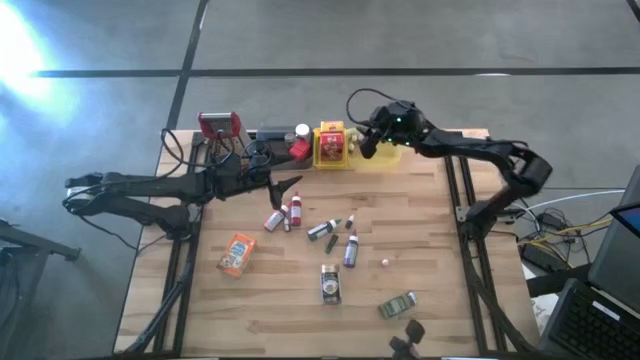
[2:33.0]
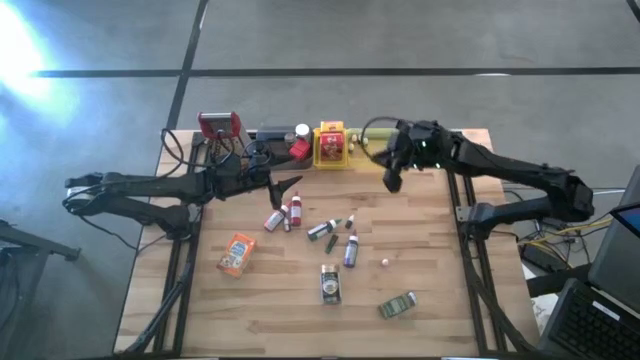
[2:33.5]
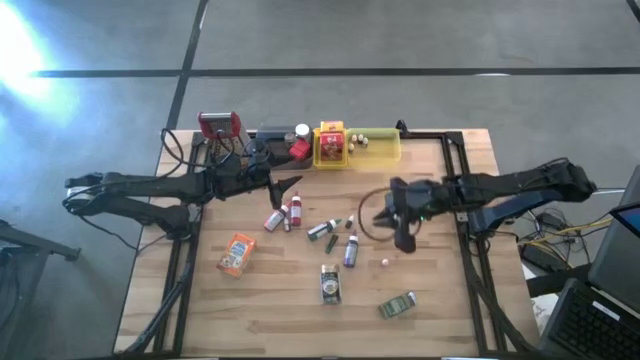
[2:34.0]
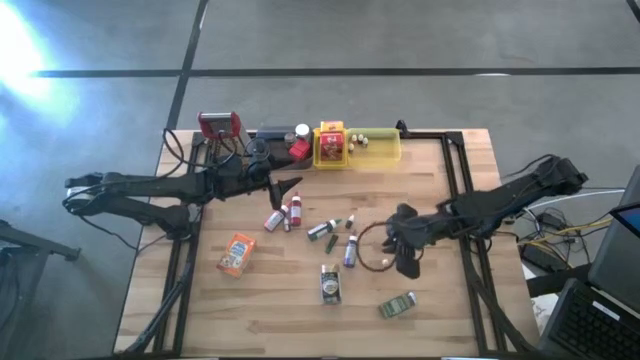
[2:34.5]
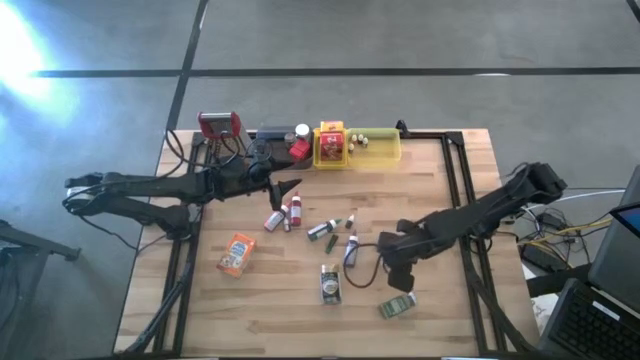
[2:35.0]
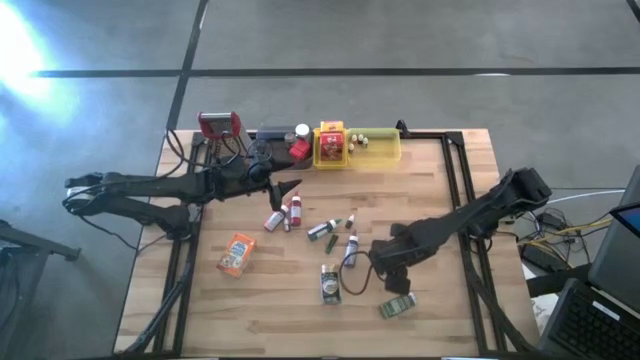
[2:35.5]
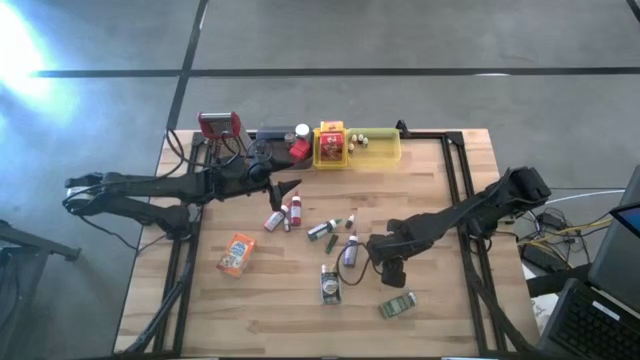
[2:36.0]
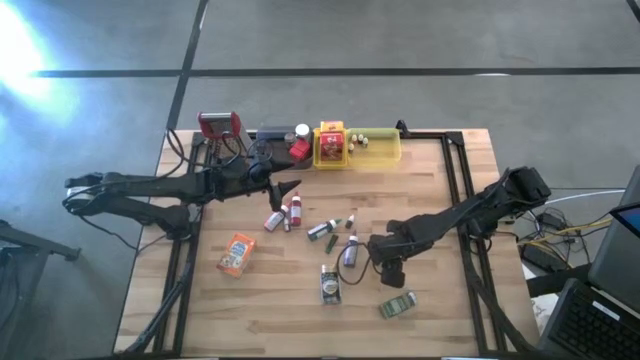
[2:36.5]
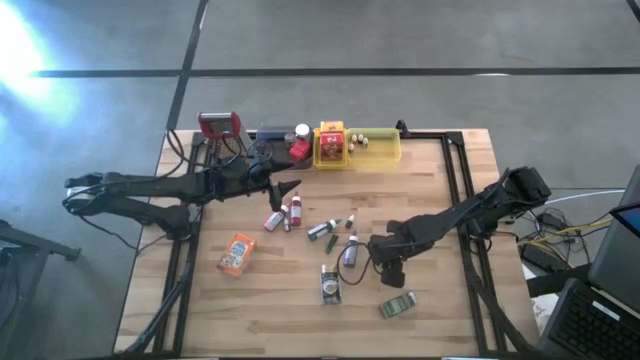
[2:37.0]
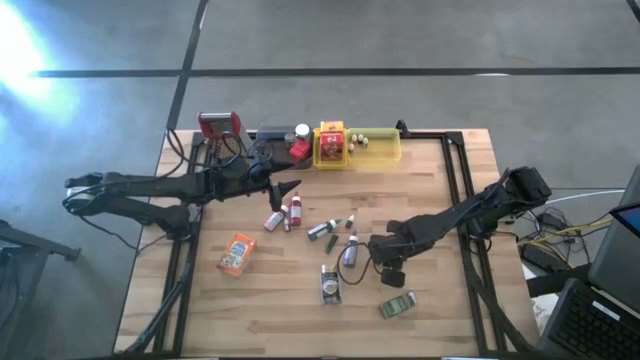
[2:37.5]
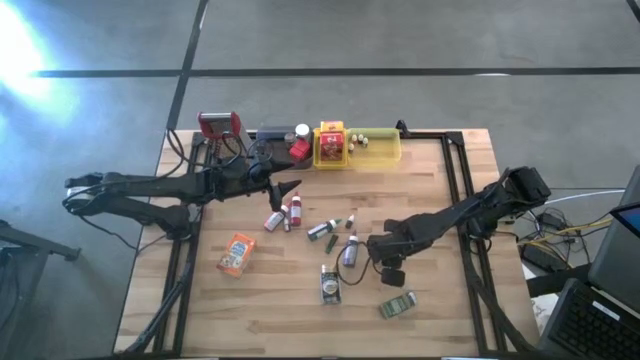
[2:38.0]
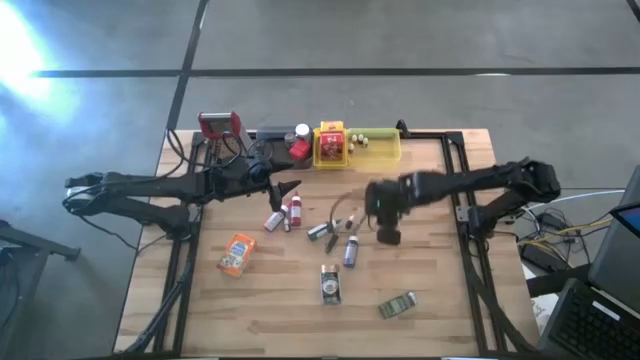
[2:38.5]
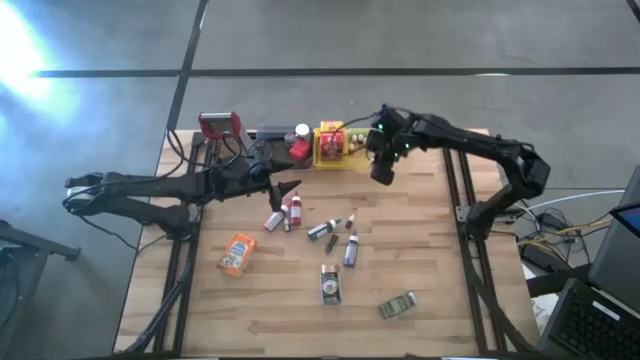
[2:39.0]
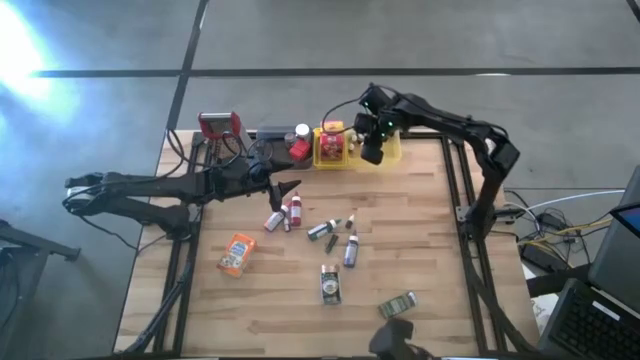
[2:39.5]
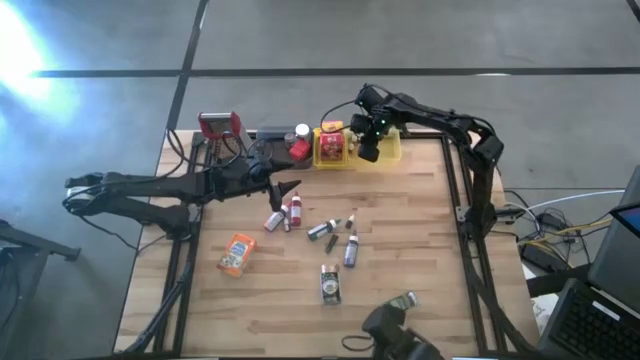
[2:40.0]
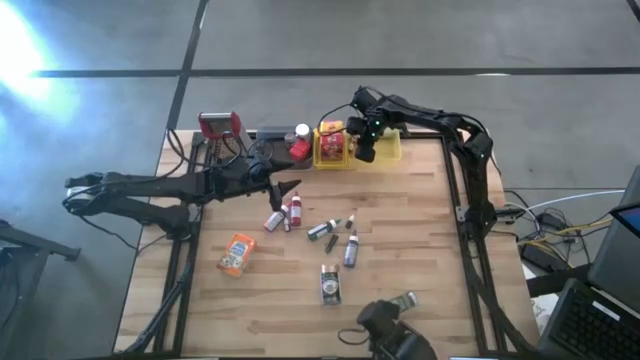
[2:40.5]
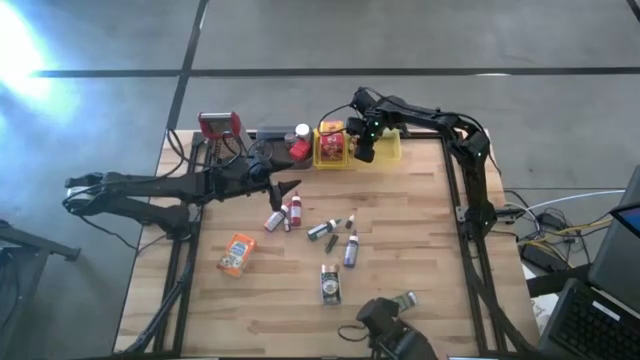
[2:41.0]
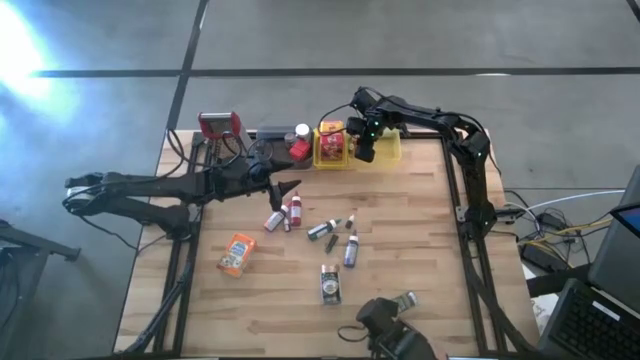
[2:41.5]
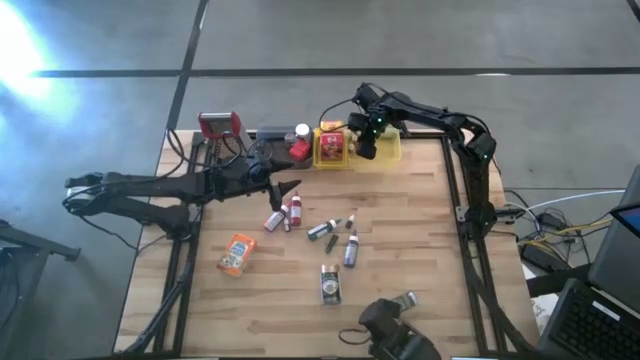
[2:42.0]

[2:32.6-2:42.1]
Task: Pick & Place Kitchen Items
Put the orange food coloring bottle into the light yellow bin

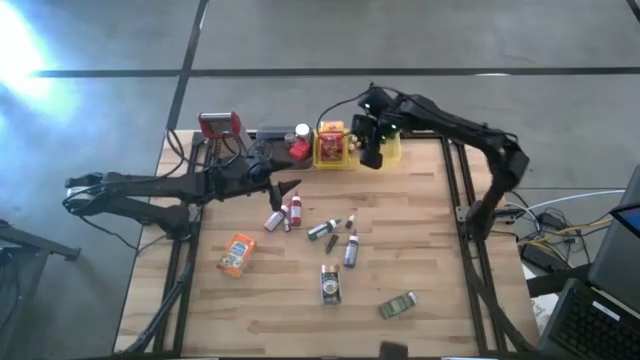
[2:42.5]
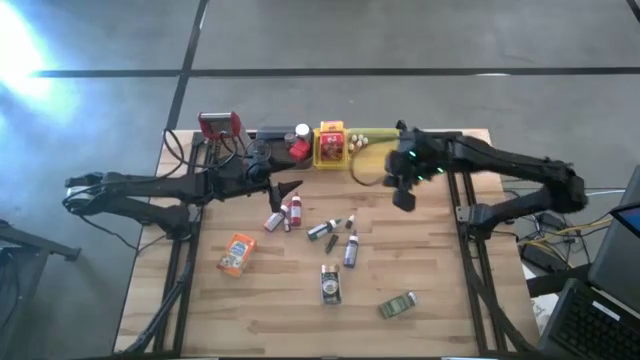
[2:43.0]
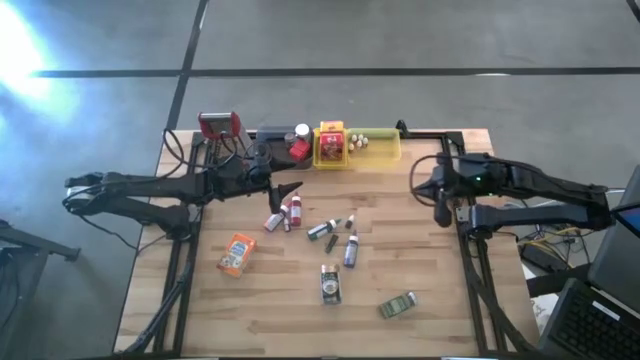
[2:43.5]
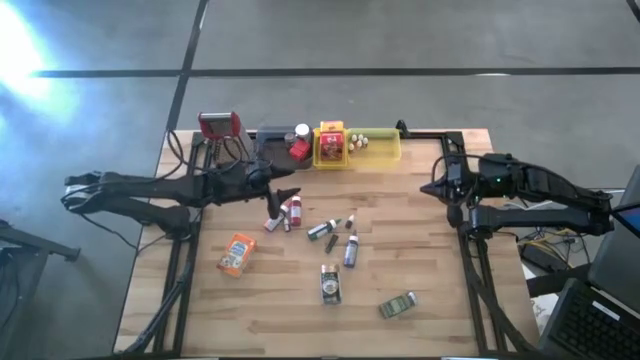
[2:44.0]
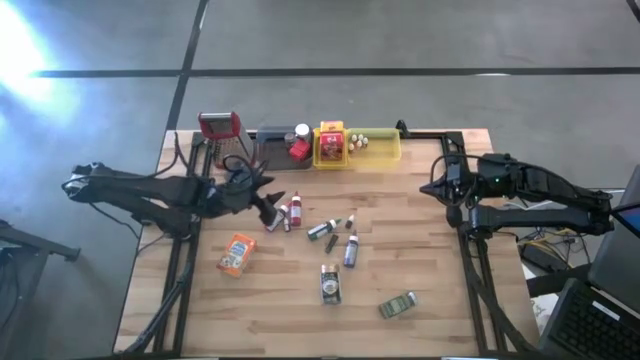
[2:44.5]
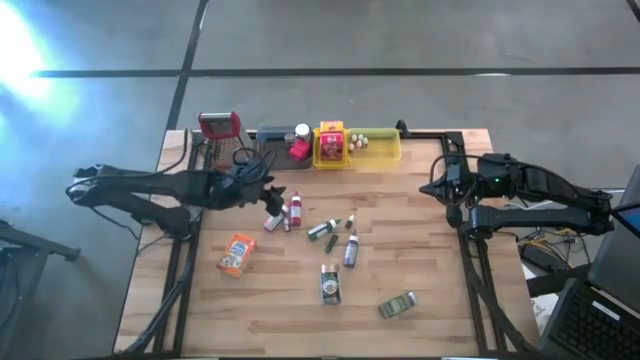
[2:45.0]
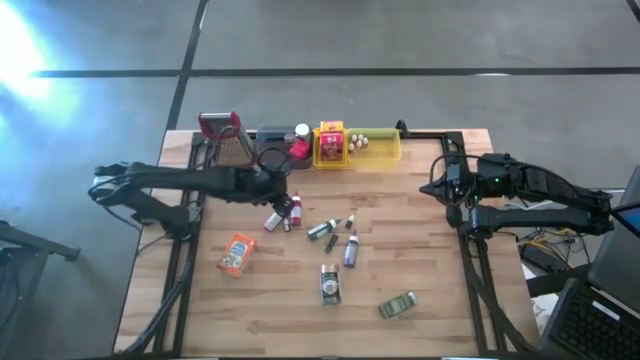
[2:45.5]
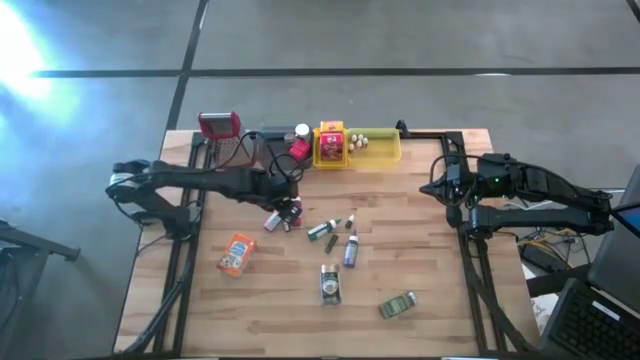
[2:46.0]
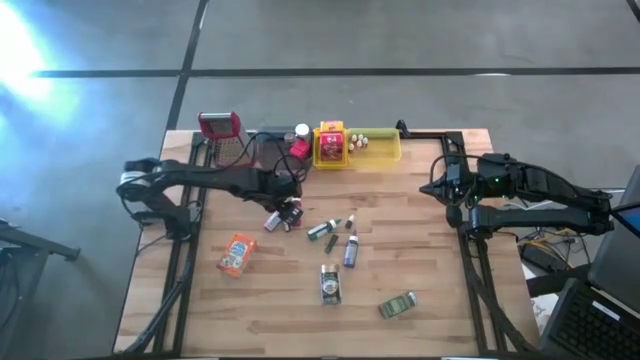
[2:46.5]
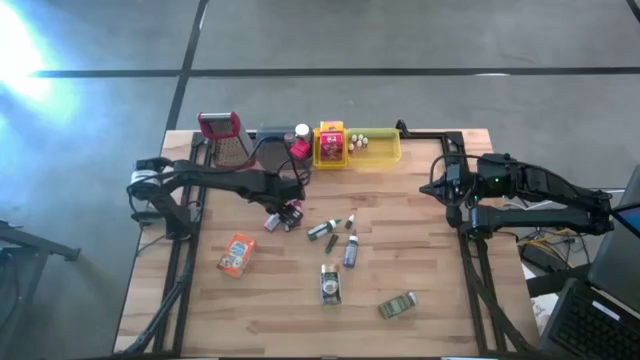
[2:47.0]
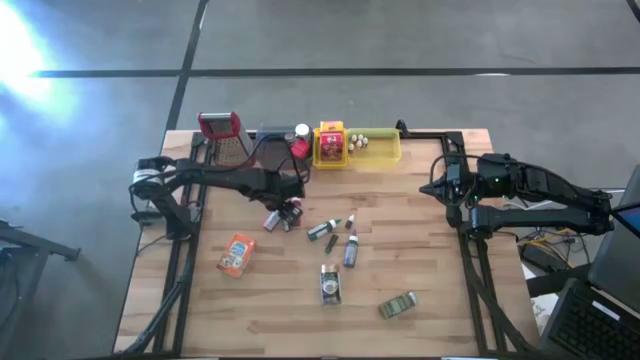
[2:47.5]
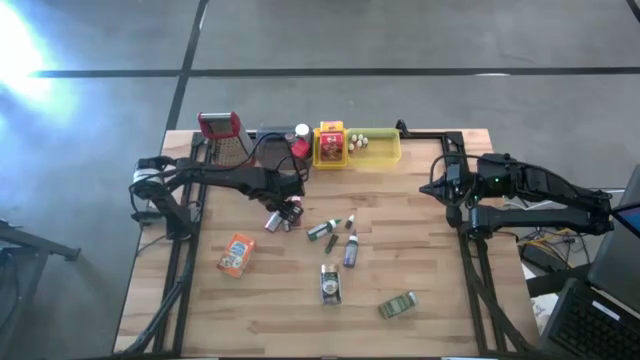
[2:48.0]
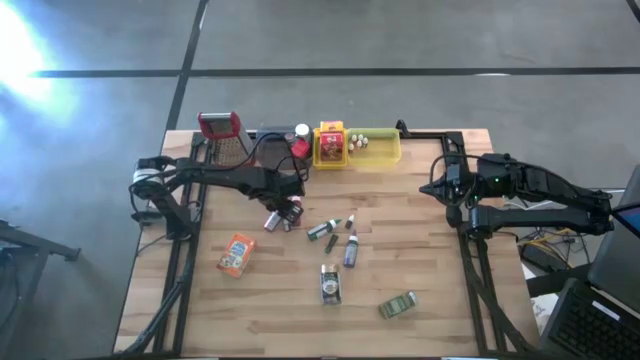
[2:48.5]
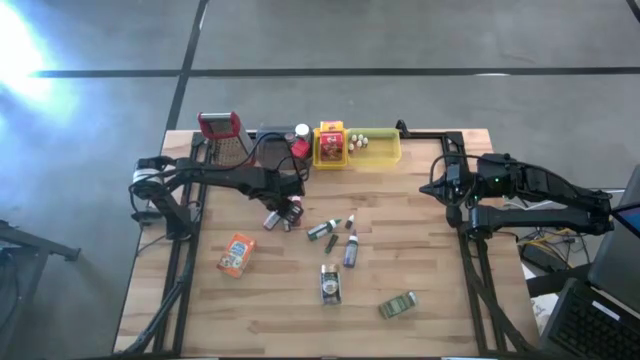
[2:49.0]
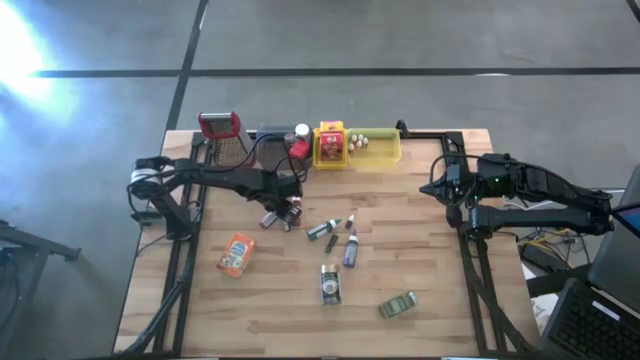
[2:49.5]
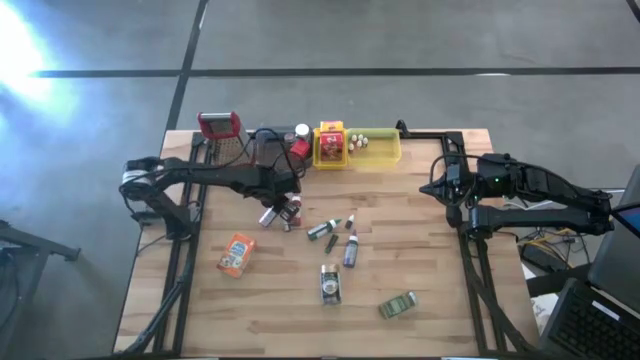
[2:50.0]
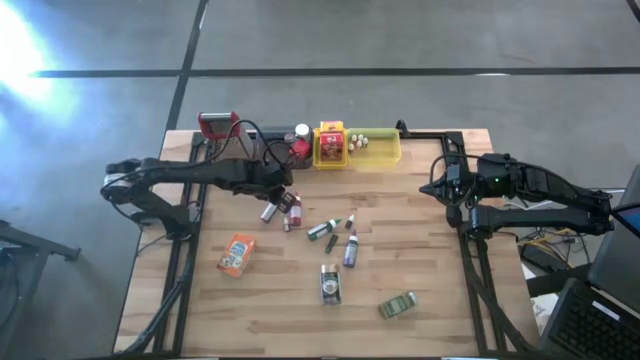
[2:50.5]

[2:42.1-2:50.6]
Put the large pink food coloring bottle into the light yellow bin
